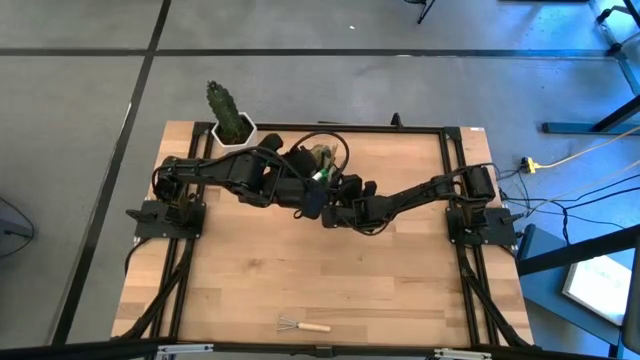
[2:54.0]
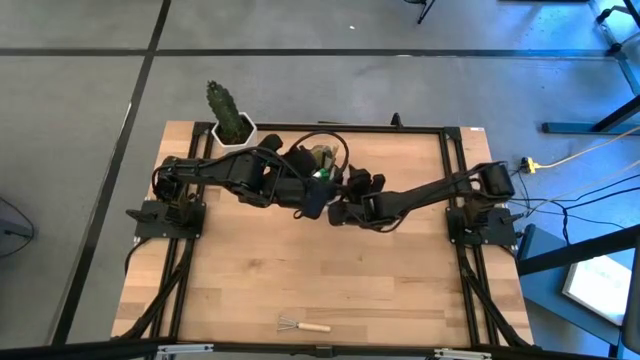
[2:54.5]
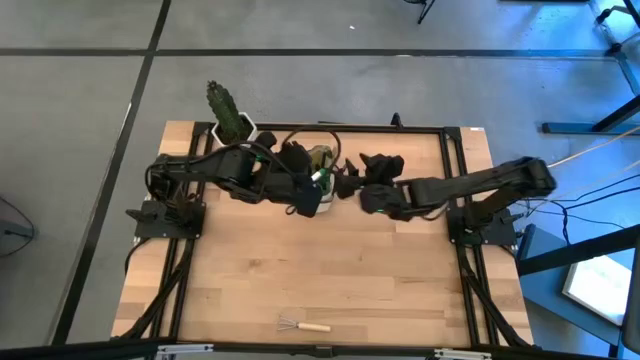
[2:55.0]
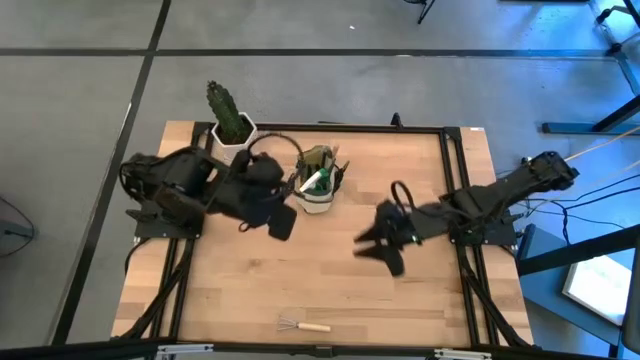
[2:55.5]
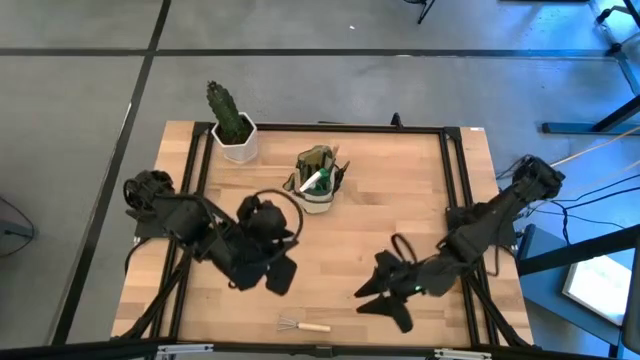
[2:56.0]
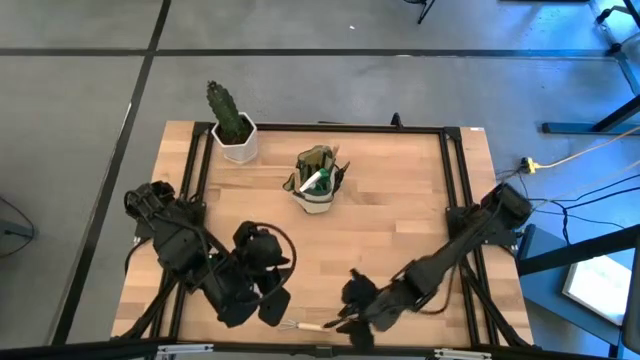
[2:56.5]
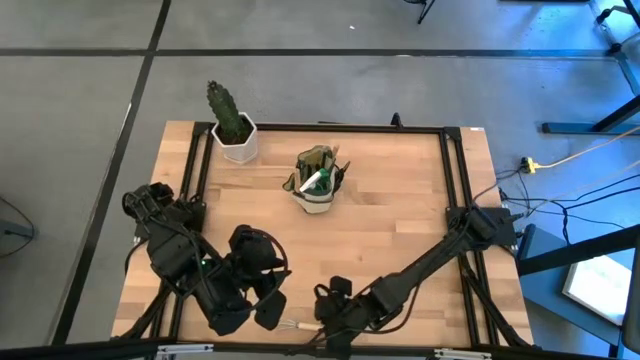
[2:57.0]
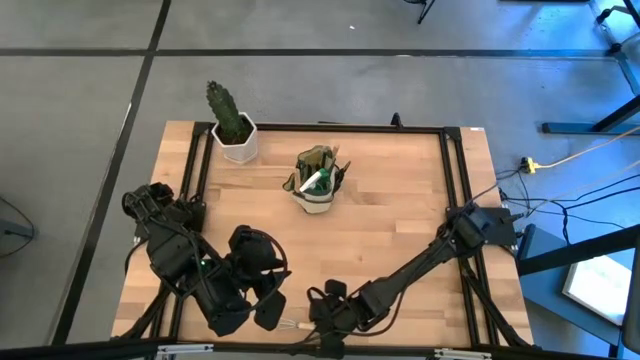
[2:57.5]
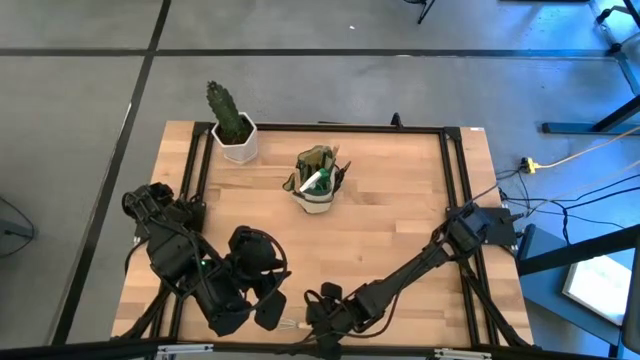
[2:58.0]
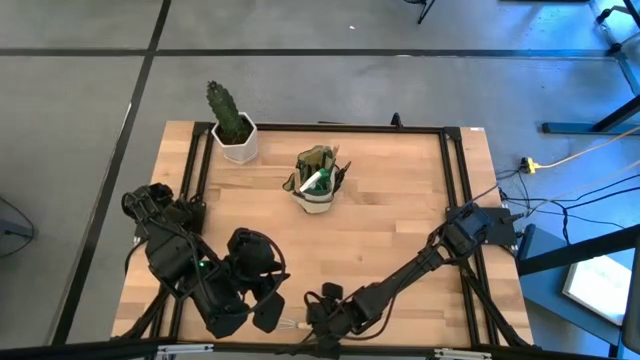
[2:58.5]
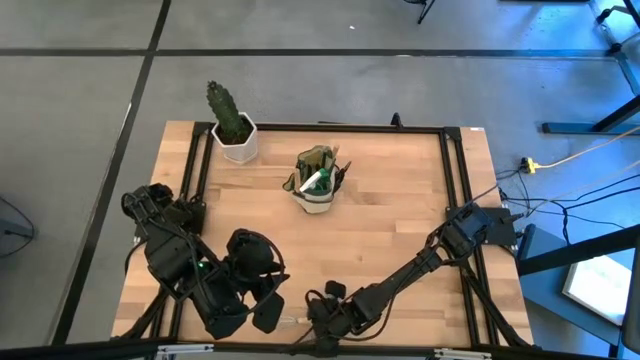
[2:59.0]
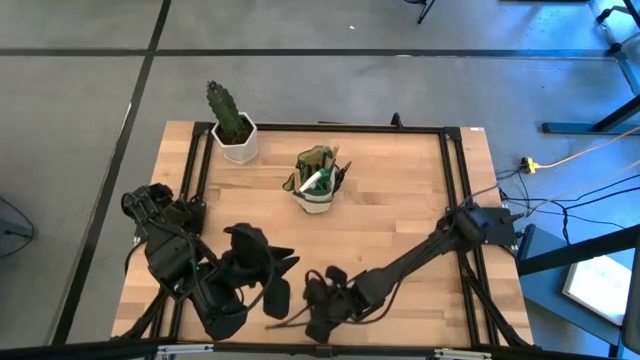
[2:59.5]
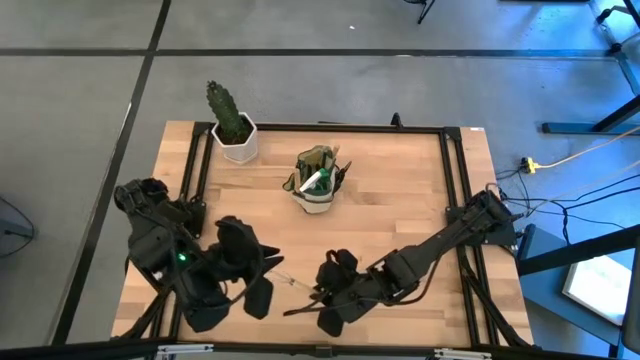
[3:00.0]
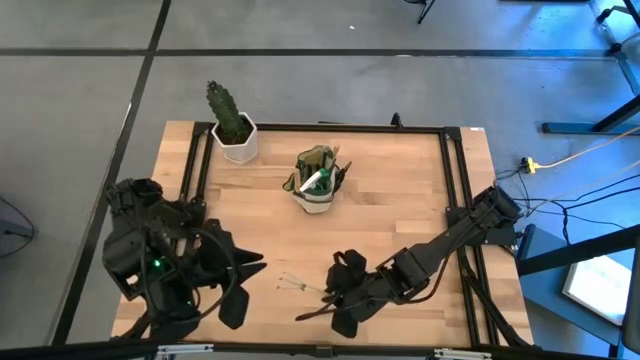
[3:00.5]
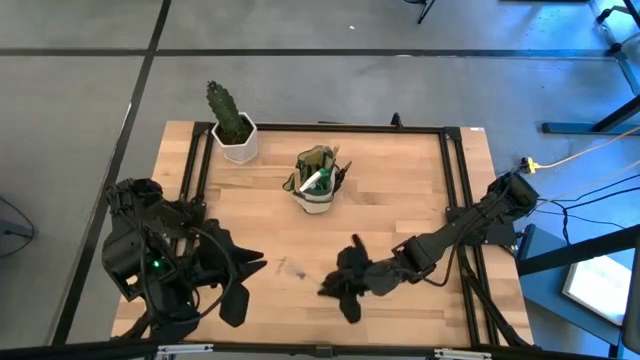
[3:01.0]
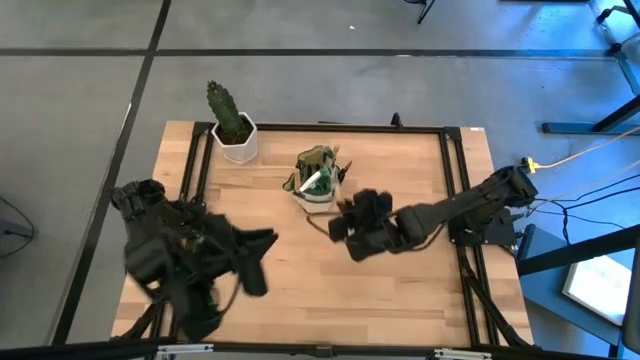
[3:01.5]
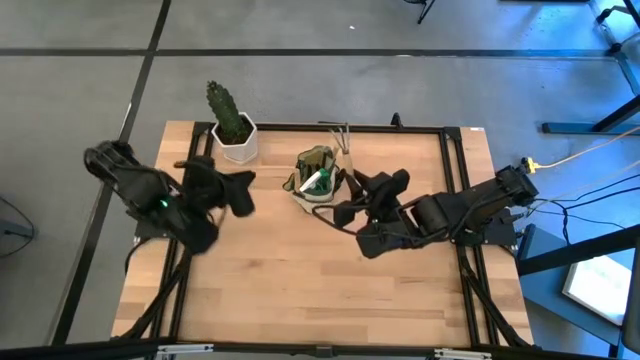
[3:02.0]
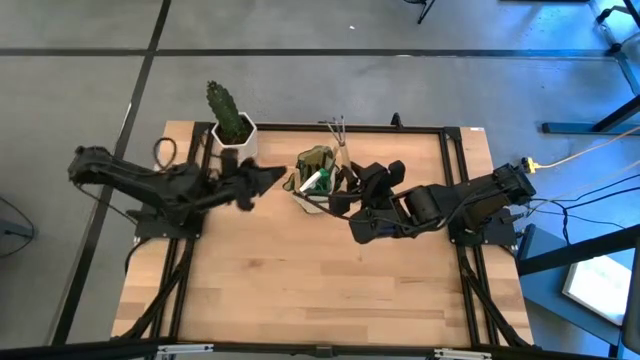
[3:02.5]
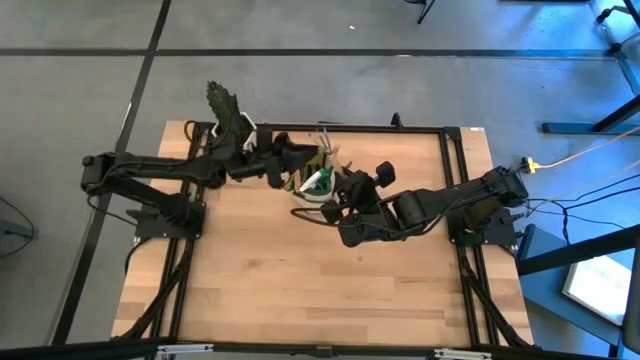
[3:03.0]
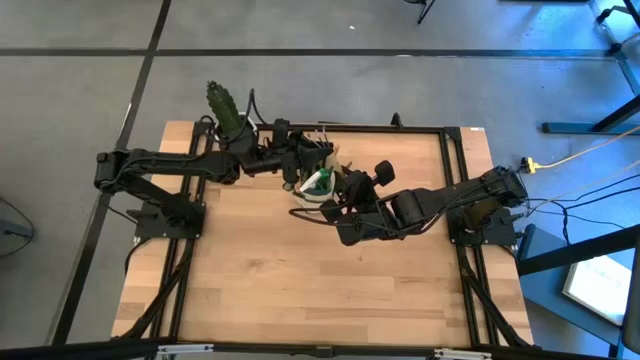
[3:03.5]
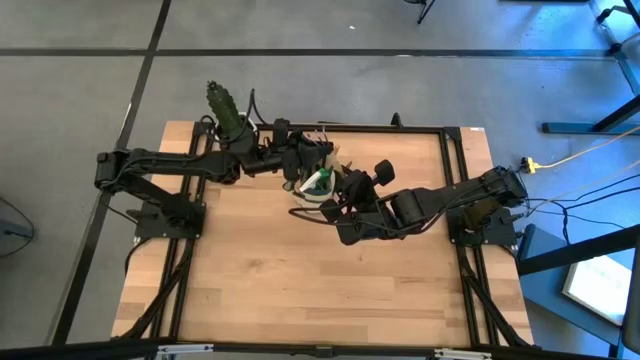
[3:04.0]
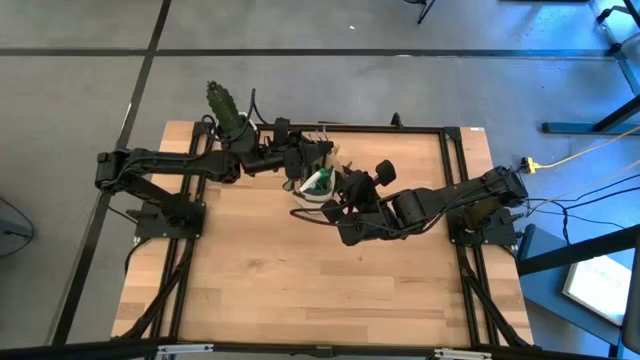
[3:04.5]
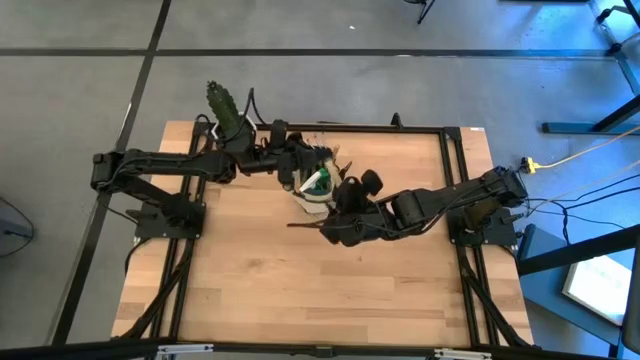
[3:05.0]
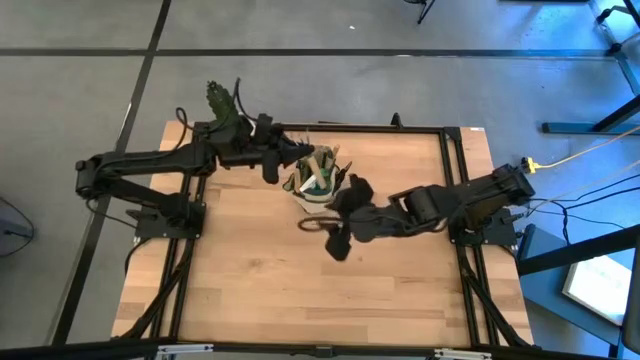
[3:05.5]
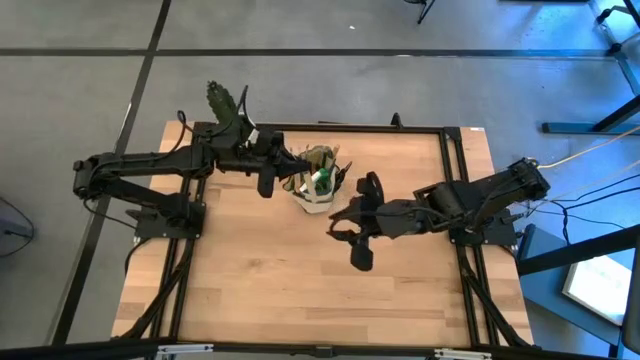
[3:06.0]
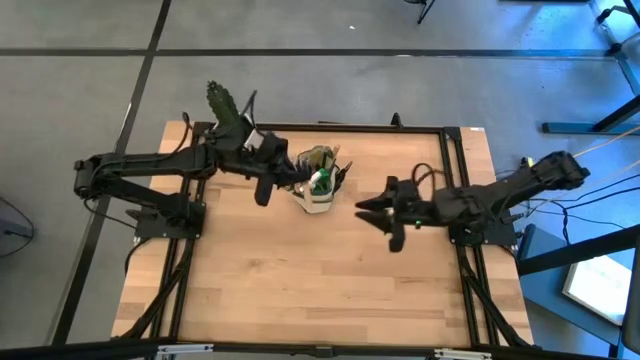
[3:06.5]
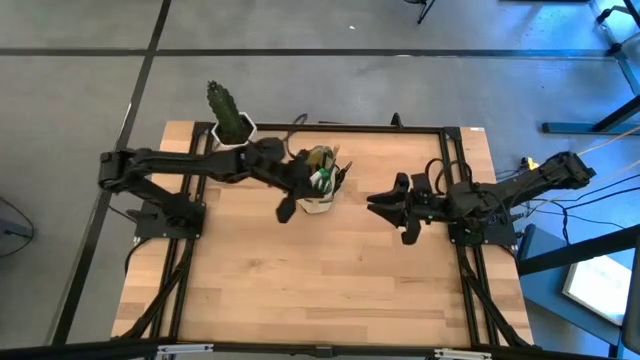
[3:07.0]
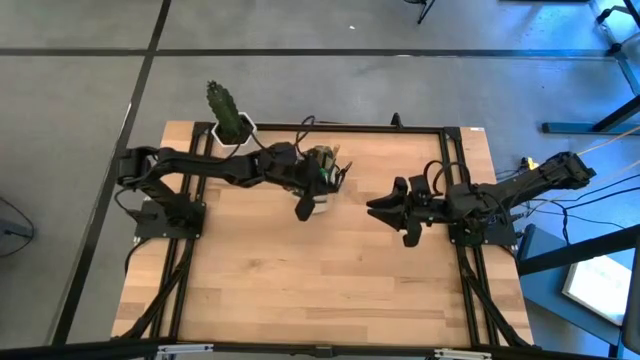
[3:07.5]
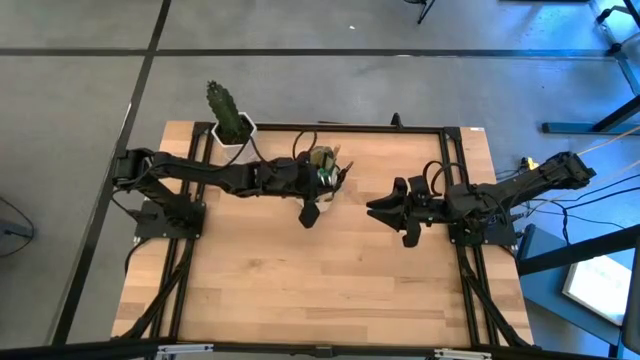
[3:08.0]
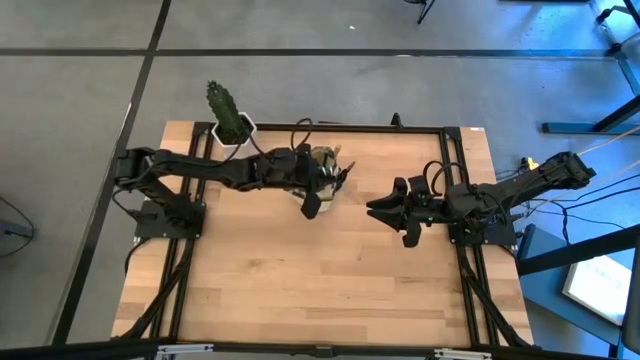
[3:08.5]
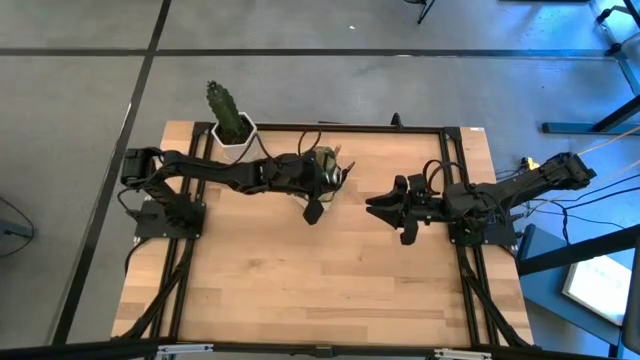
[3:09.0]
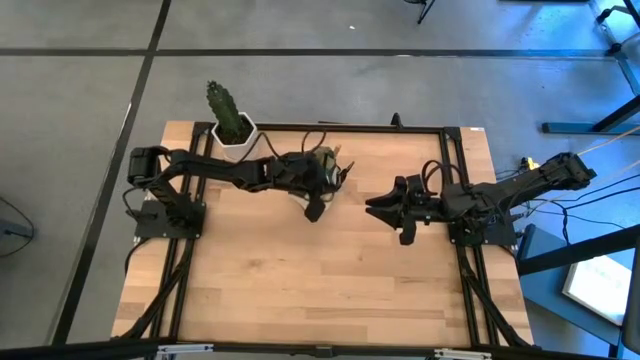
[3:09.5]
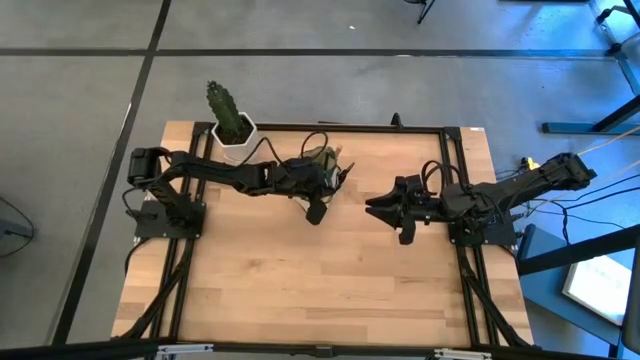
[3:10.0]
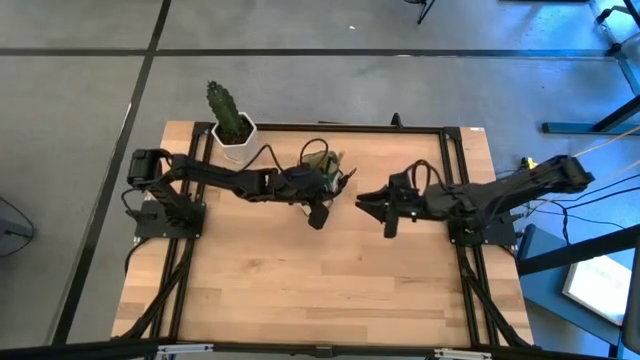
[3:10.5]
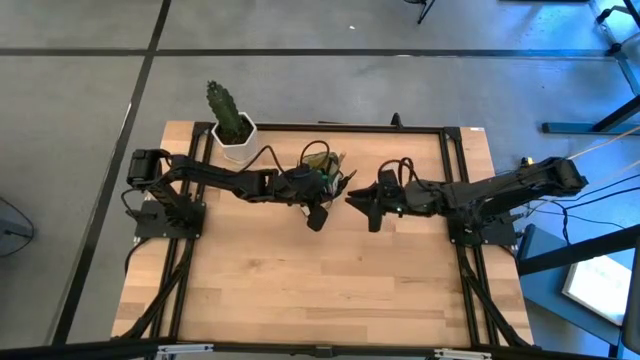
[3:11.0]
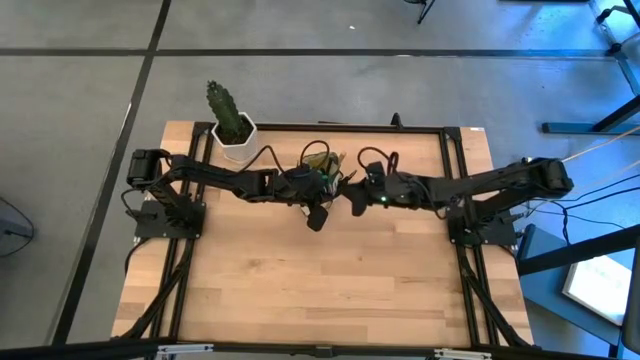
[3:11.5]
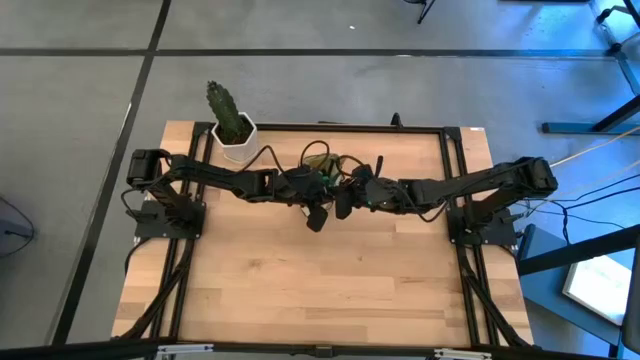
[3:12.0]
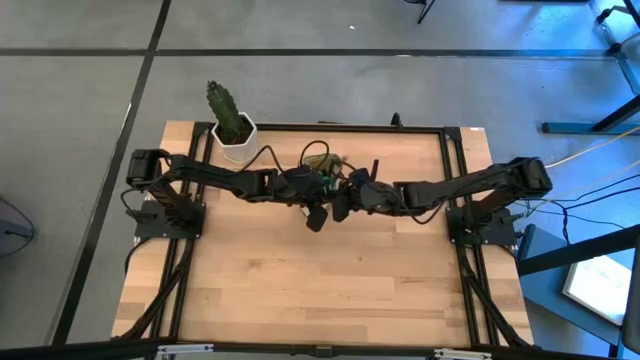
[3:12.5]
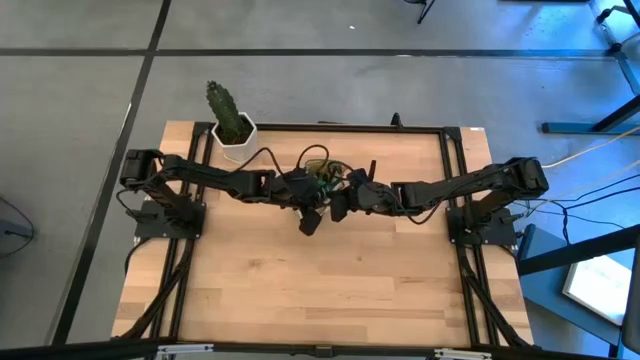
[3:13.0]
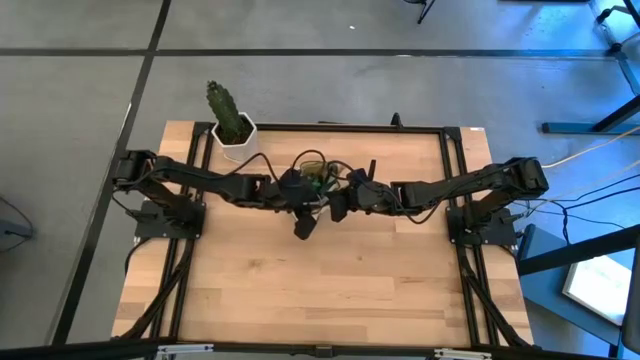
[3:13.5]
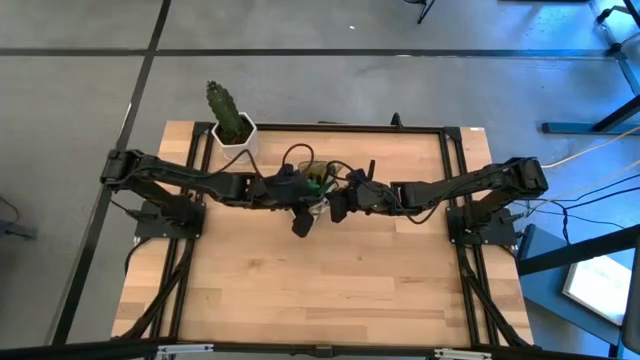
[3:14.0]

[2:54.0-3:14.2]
Task: Pick & Place Garden tools in Gardening bag
Put the hand rake into the gardening bag

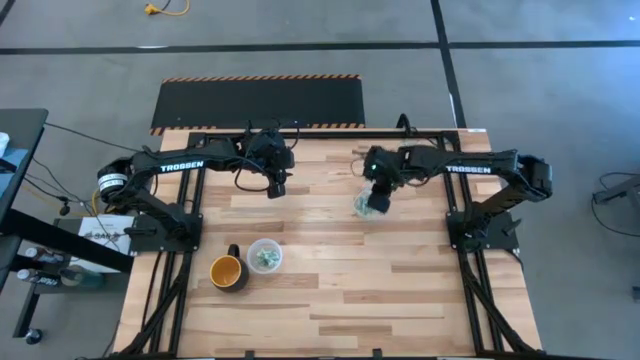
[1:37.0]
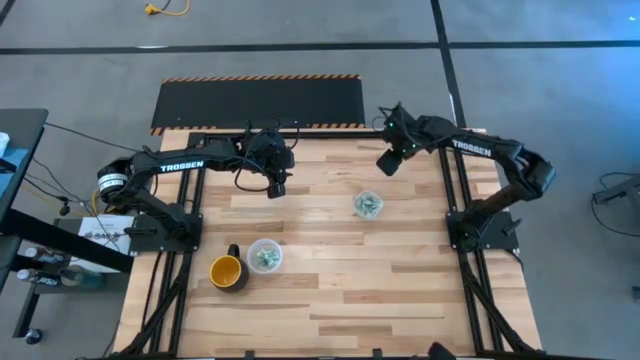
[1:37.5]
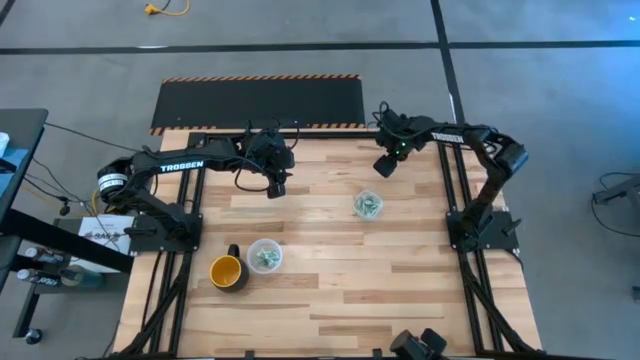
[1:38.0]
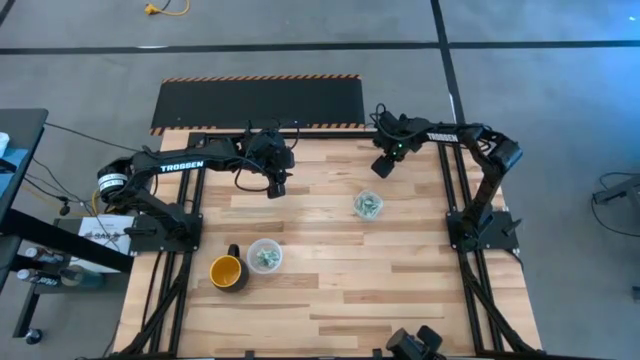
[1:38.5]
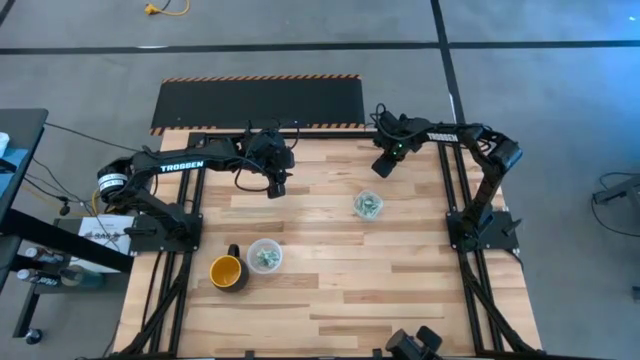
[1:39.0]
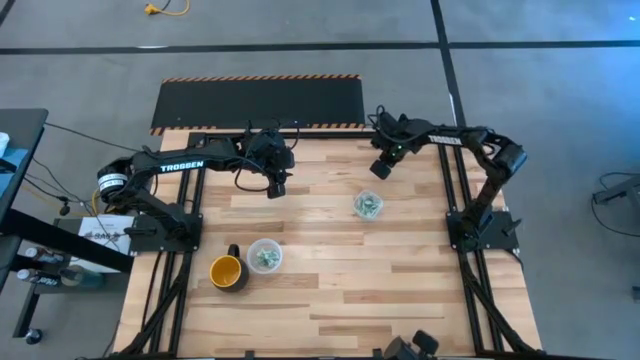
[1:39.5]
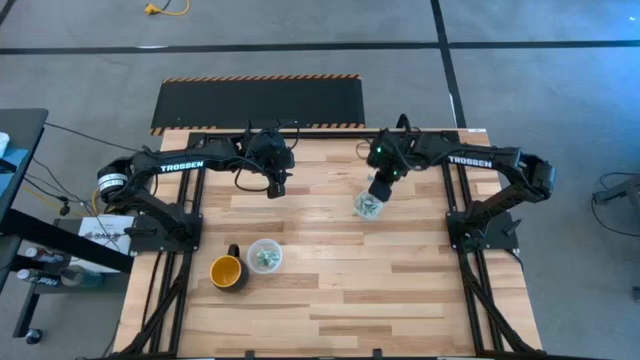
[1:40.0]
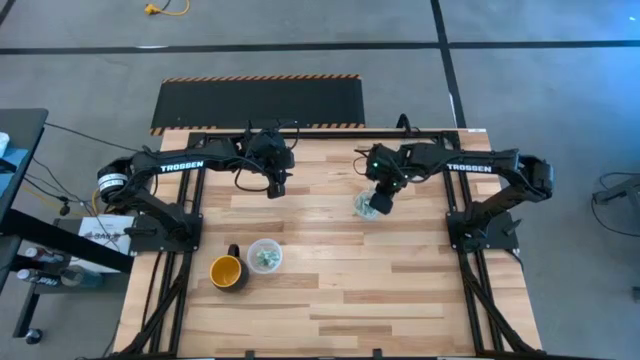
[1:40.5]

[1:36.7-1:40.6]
Task: Pick and place Stevia / Truvia into bins
Put the white stevia packet into the square transparent container
